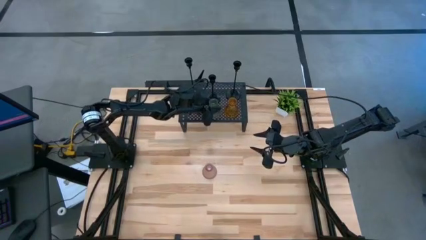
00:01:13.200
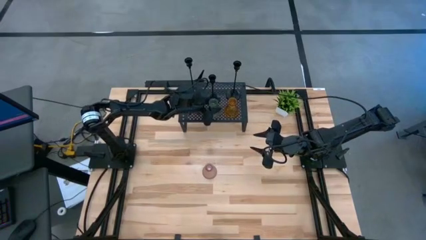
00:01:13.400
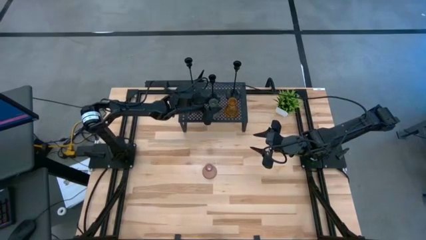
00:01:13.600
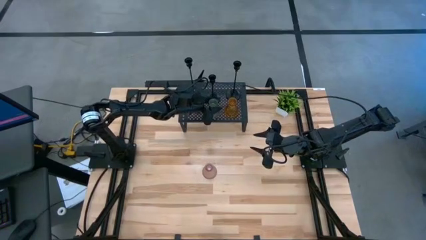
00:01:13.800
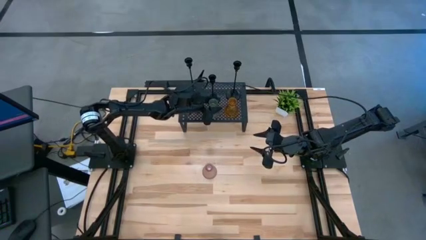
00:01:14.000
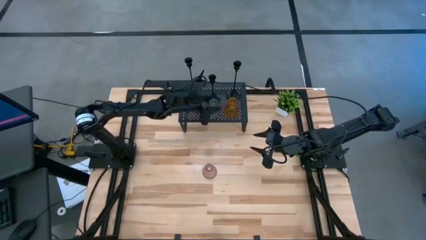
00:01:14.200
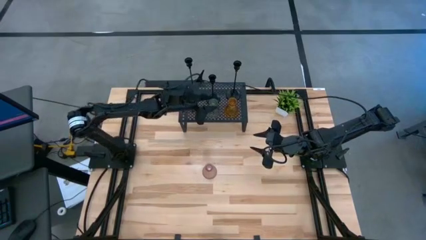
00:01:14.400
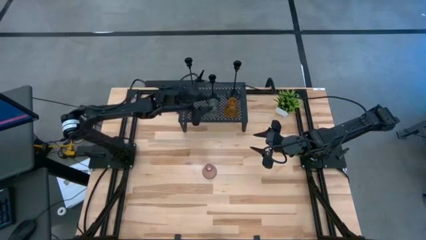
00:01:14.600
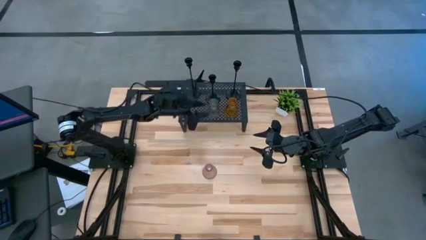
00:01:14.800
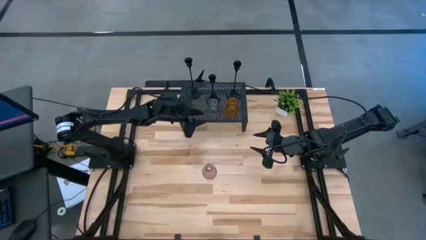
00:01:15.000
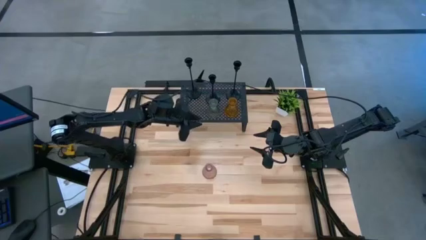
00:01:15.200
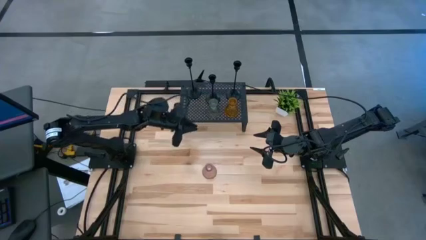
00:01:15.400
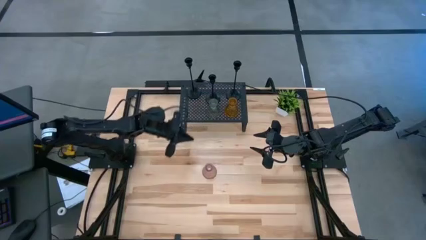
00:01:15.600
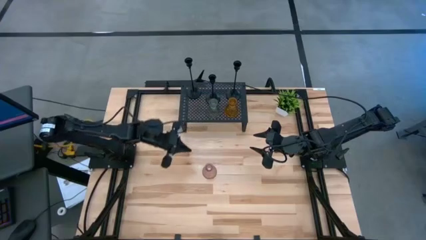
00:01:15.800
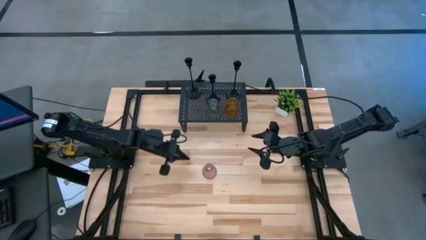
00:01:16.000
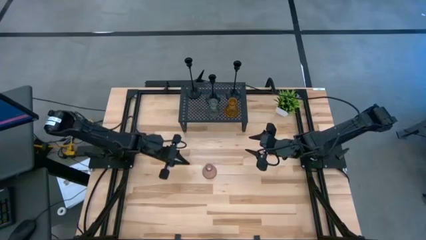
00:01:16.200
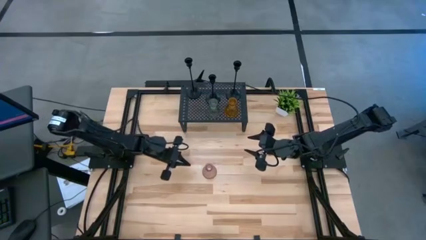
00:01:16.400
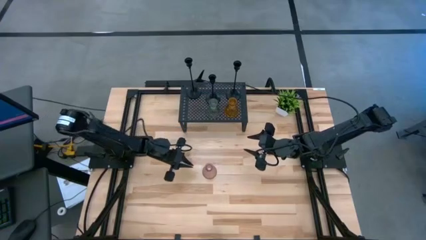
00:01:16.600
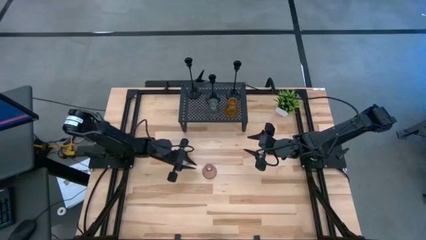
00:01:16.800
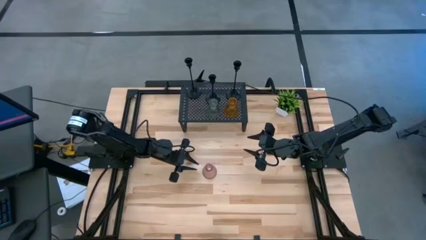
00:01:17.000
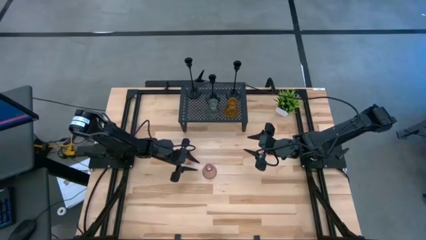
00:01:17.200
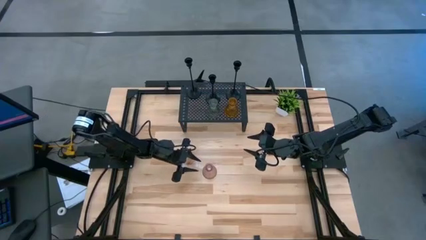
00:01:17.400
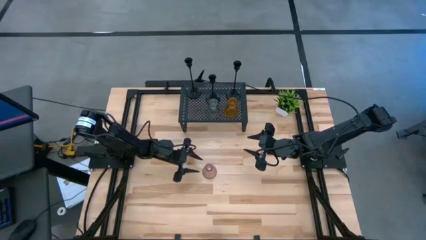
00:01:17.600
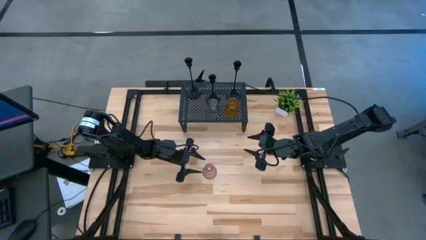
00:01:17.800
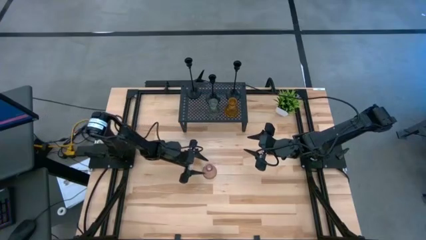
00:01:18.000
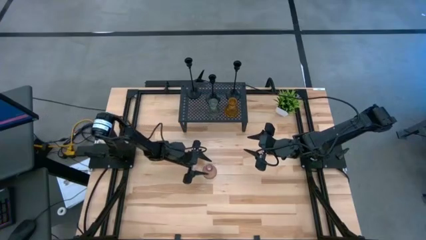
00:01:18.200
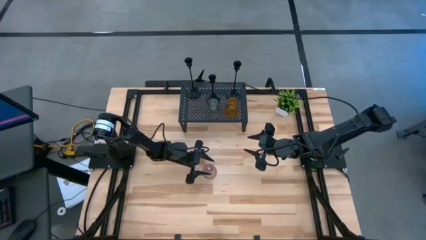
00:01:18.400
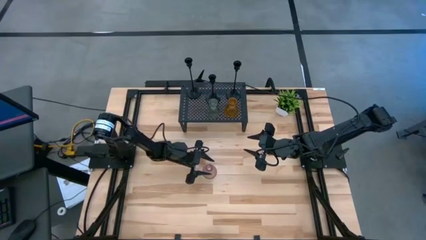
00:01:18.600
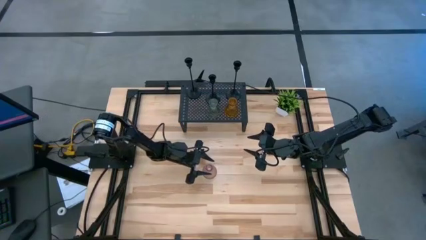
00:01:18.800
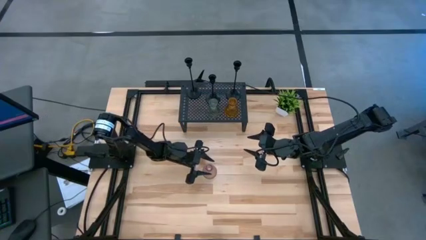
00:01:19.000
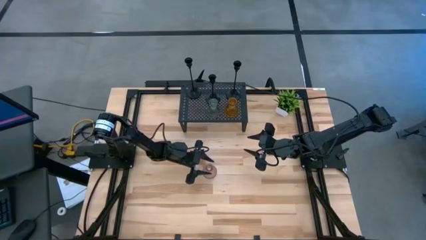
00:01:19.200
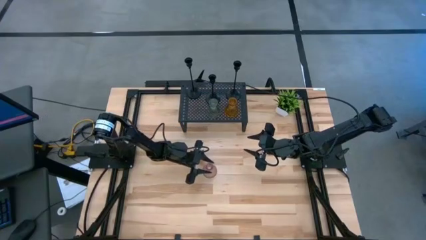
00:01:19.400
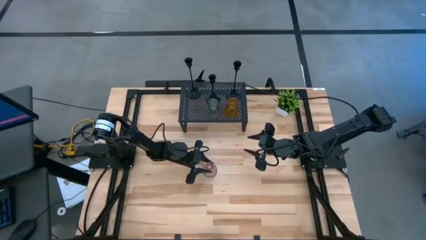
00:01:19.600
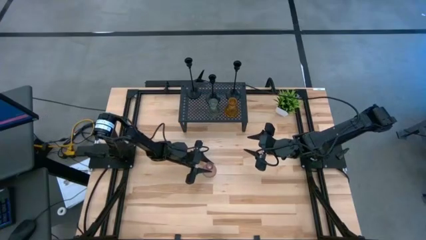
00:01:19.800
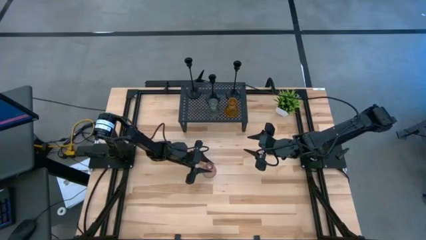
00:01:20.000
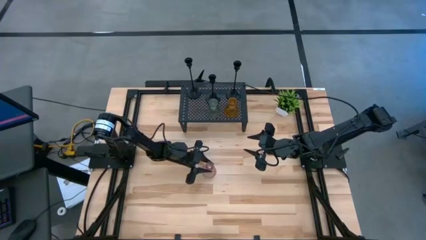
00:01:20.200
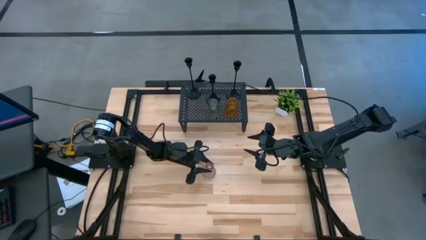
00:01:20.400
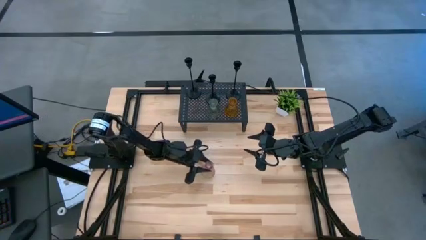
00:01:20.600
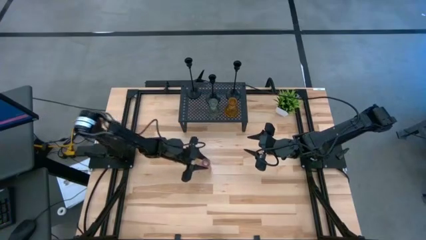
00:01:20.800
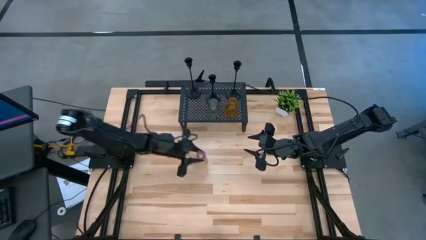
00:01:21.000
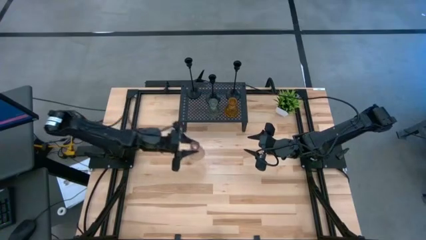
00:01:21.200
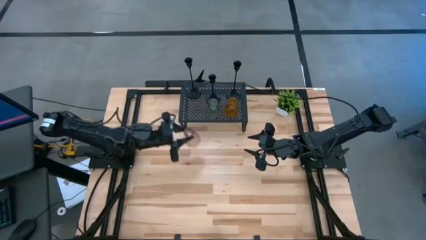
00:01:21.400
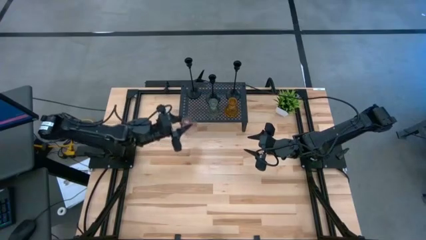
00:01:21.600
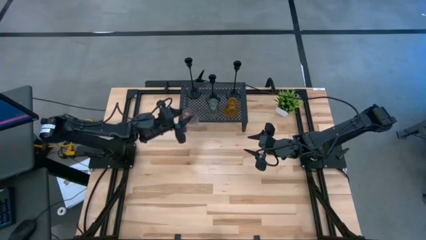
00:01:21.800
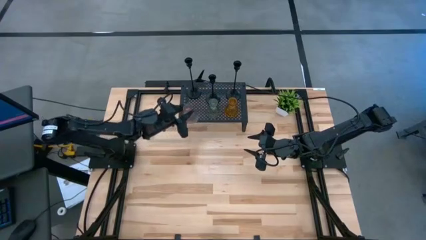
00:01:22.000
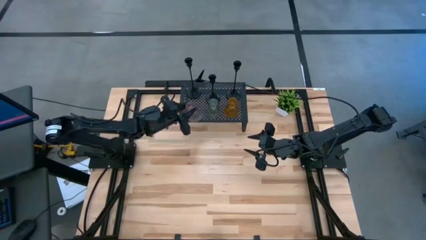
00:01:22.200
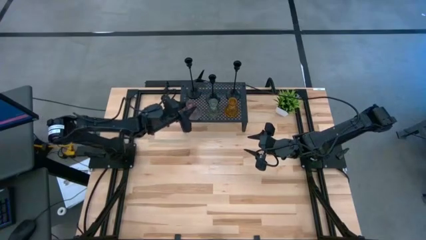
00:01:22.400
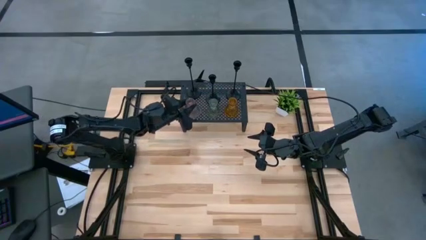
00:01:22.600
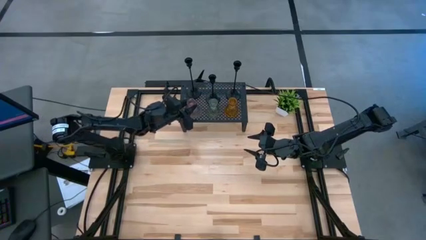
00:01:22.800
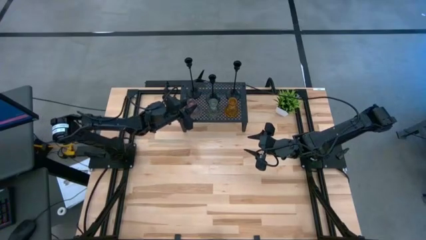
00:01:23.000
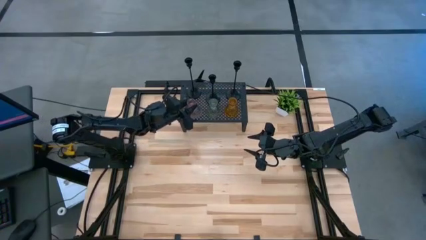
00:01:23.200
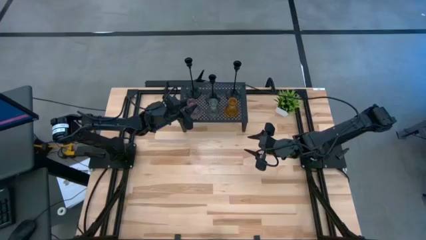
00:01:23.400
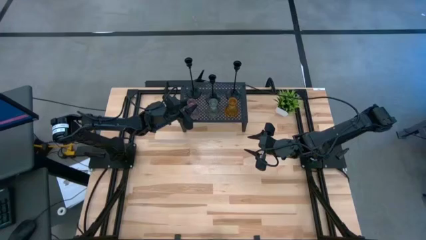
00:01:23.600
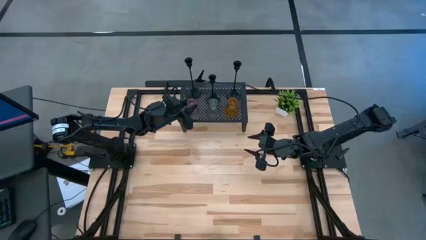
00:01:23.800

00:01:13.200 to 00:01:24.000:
Task: Pick & Place candle stick holders
Put the pink glass candle holder on the shelf

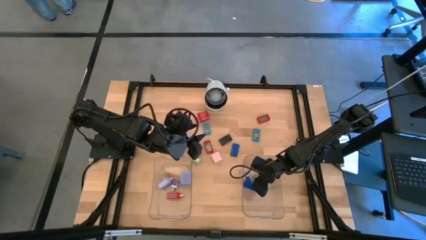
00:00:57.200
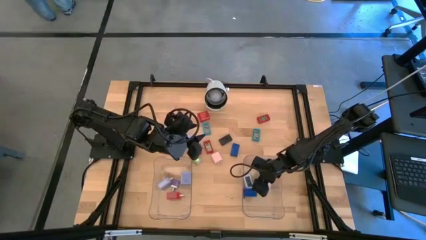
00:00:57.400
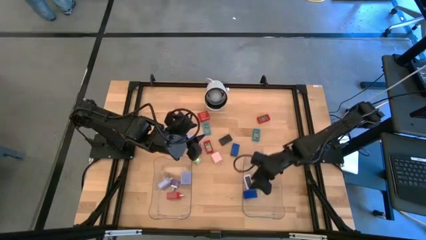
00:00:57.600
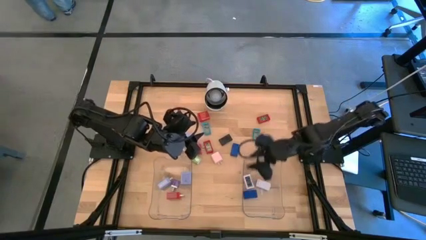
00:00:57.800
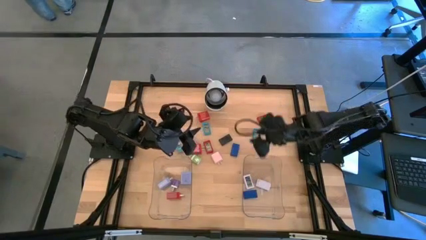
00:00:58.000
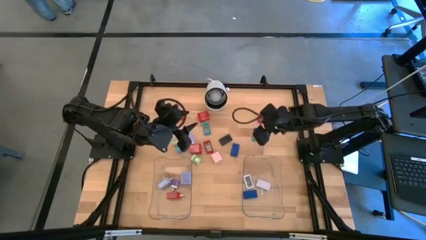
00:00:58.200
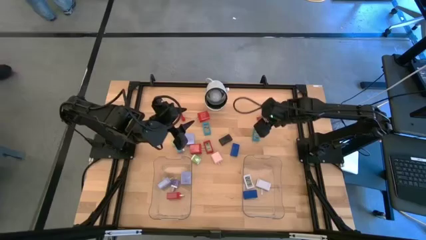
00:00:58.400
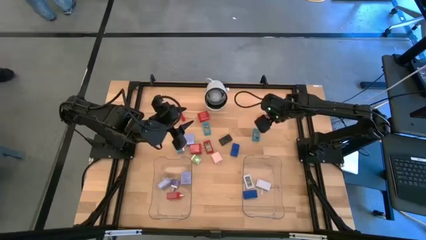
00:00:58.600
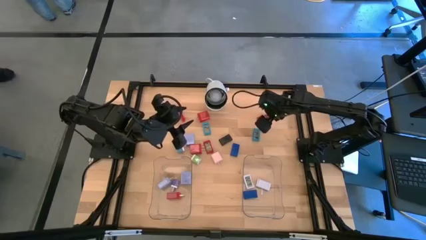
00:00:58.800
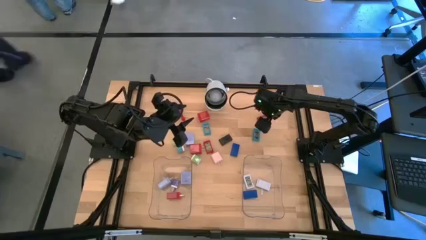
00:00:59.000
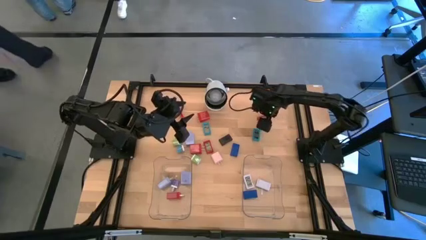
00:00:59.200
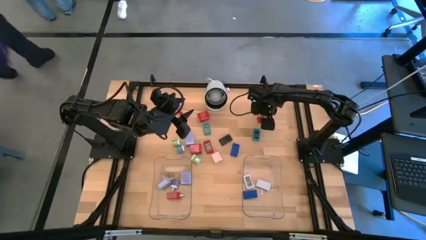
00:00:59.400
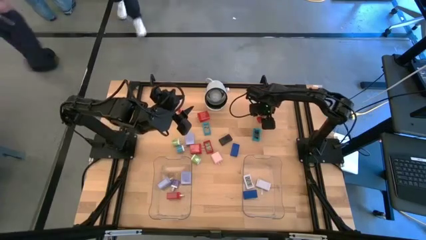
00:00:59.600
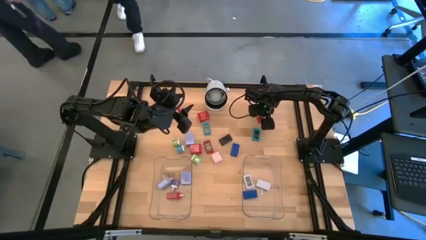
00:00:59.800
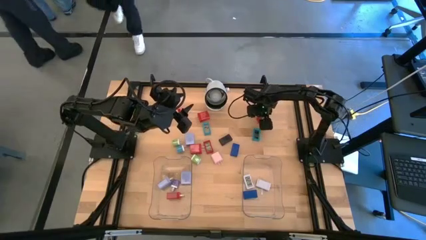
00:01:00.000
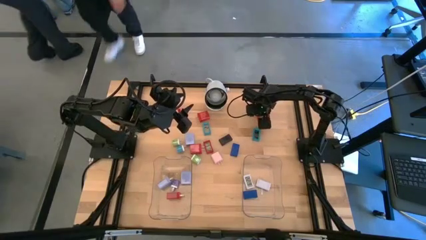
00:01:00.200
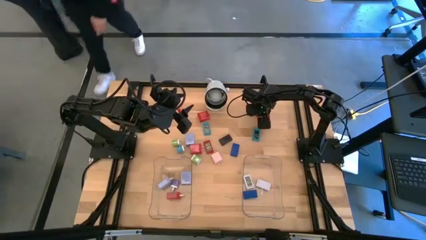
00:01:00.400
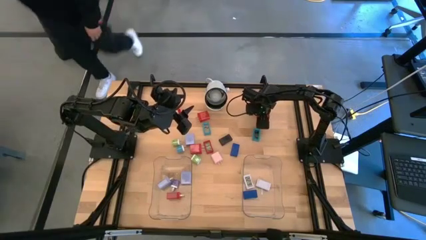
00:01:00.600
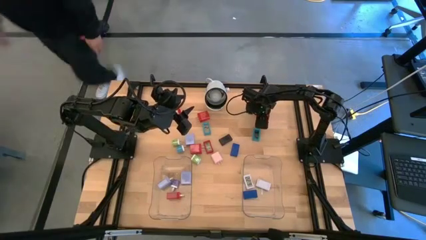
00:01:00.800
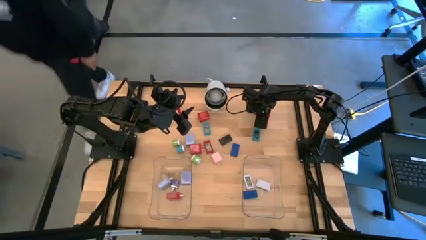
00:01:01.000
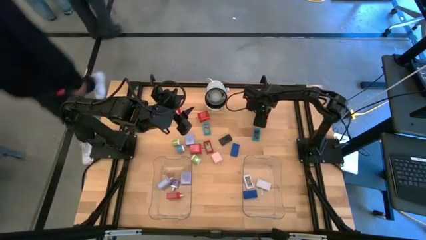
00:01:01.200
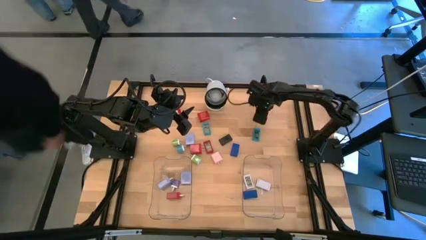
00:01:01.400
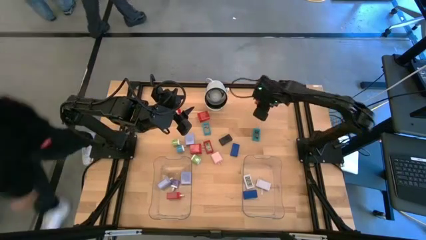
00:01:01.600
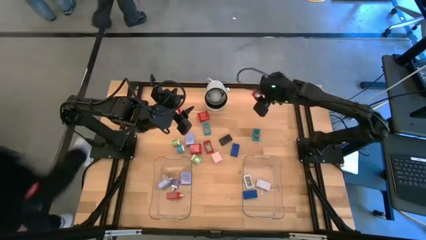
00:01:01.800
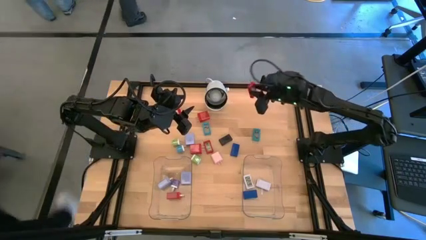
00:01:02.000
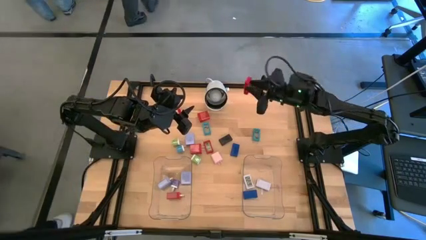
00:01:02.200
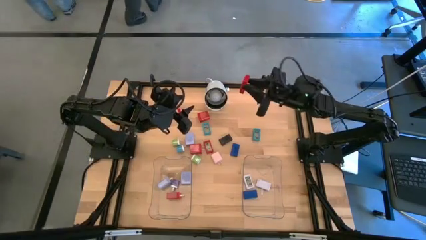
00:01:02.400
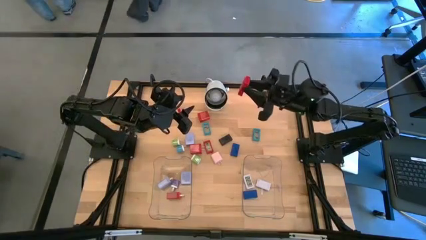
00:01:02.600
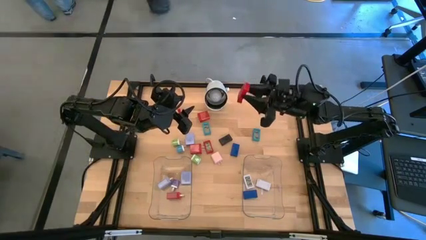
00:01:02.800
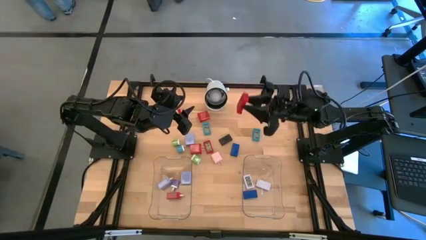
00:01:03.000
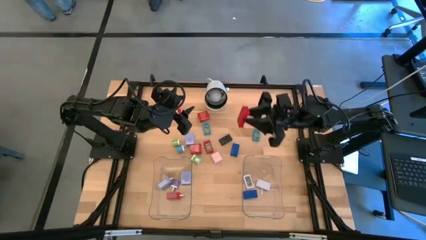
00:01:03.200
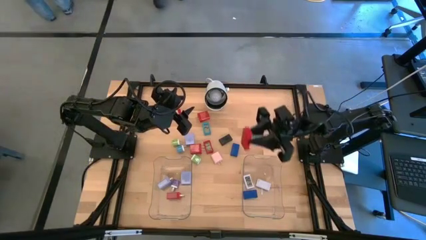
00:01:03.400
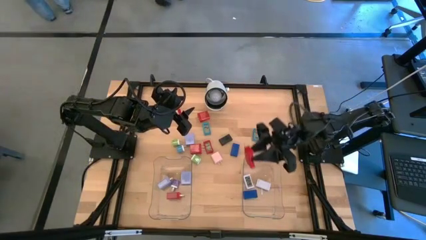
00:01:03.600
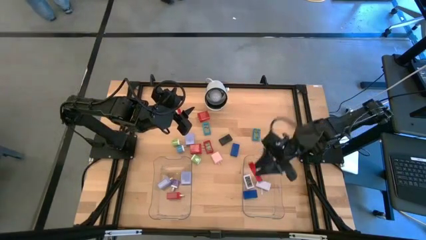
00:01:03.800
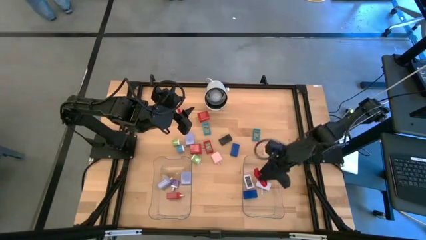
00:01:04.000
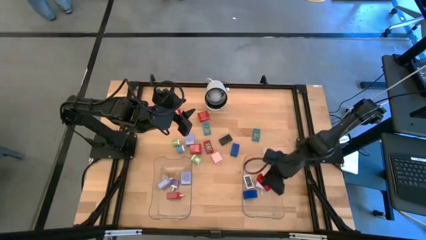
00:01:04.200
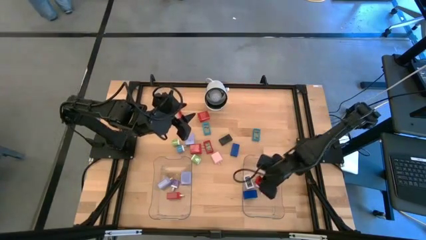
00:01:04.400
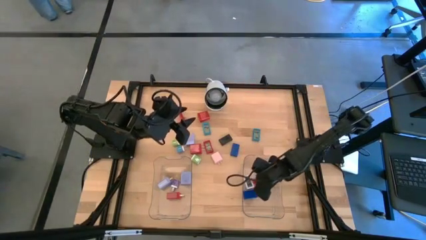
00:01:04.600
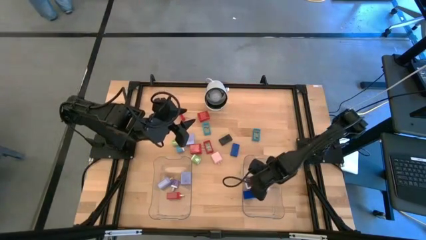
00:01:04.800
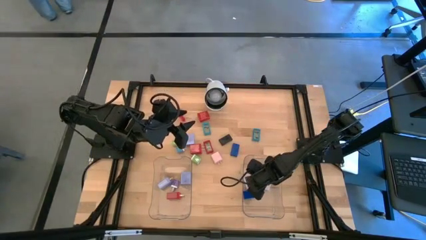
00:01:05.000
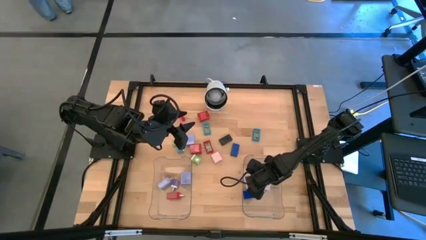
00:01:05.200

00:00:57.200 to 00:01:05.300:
Task: Pick & Place Office items
Put the top right red timer into the right transparent bin
